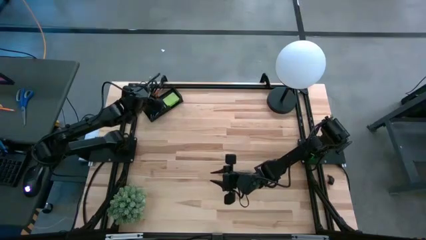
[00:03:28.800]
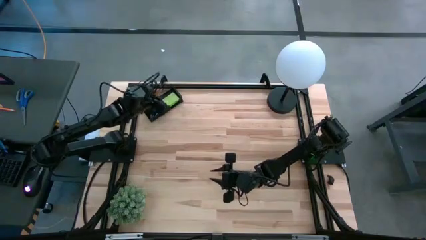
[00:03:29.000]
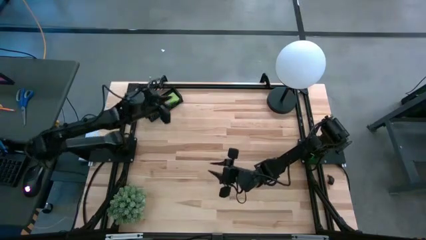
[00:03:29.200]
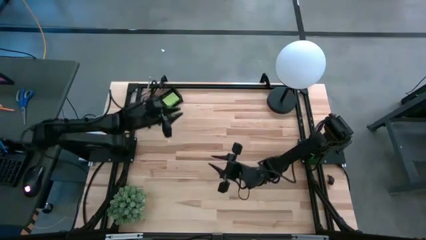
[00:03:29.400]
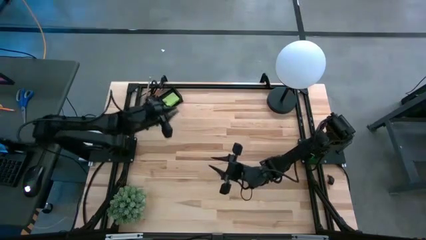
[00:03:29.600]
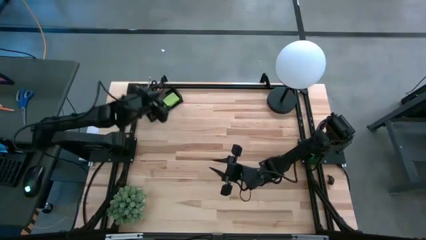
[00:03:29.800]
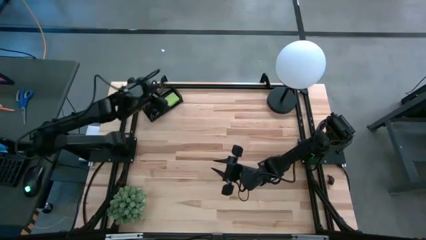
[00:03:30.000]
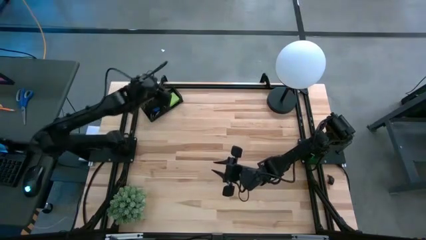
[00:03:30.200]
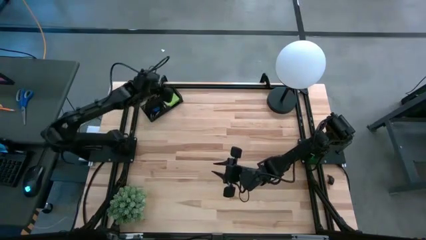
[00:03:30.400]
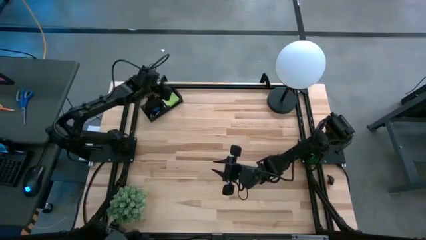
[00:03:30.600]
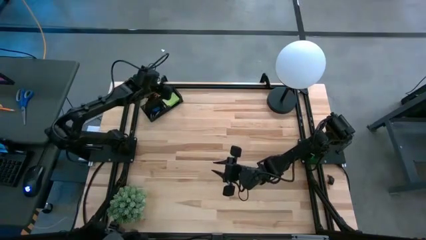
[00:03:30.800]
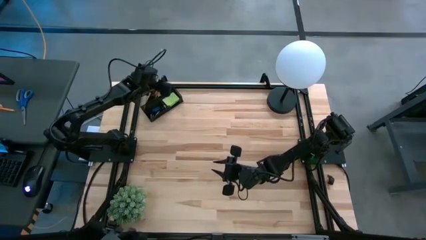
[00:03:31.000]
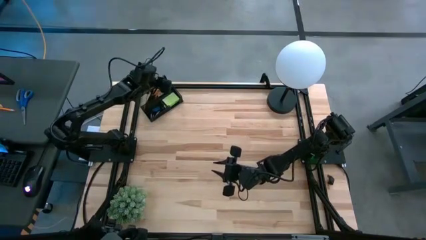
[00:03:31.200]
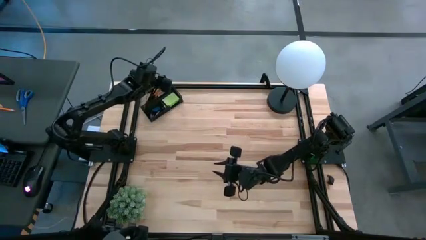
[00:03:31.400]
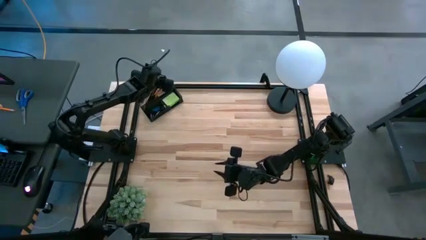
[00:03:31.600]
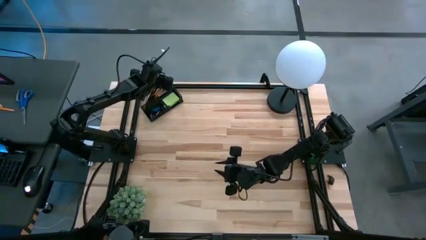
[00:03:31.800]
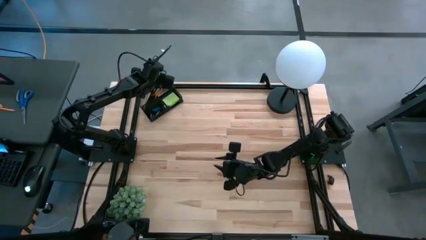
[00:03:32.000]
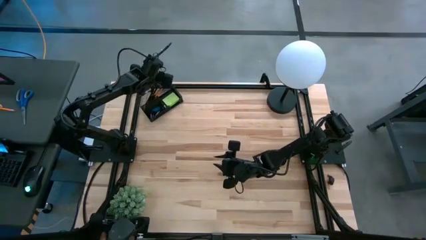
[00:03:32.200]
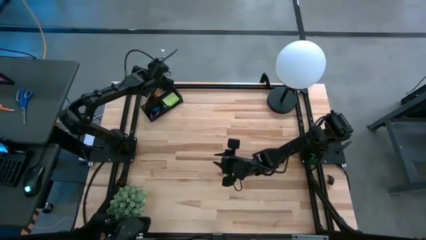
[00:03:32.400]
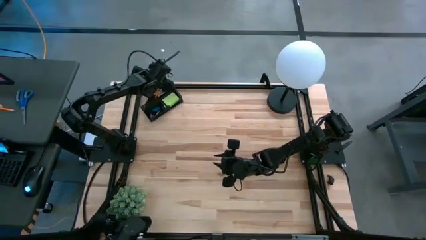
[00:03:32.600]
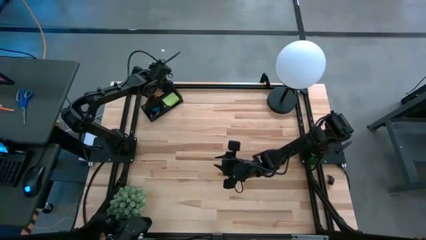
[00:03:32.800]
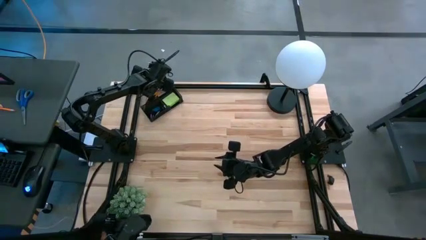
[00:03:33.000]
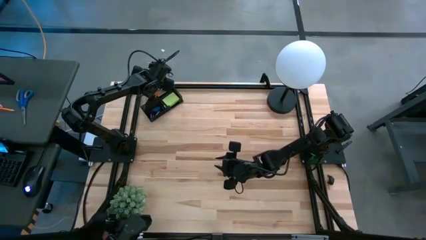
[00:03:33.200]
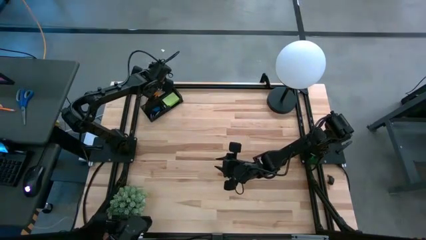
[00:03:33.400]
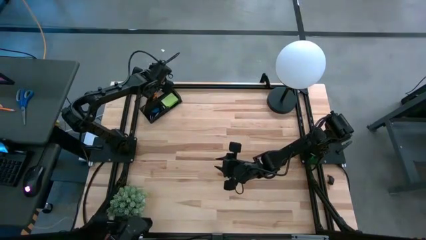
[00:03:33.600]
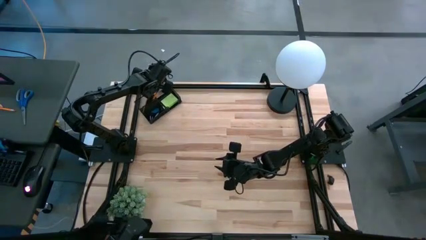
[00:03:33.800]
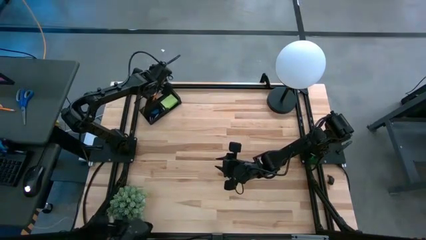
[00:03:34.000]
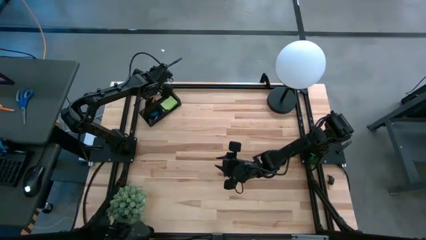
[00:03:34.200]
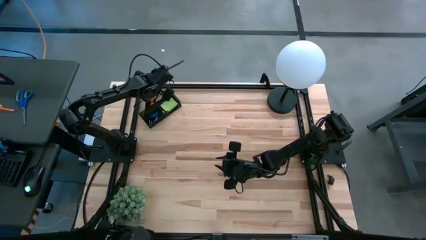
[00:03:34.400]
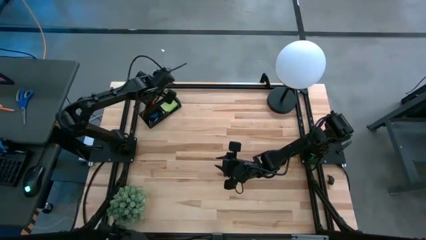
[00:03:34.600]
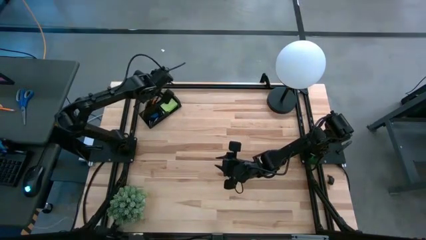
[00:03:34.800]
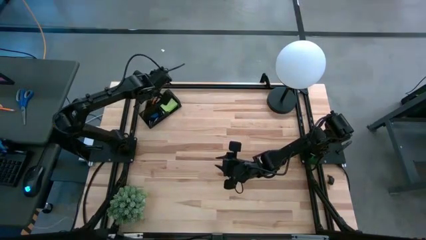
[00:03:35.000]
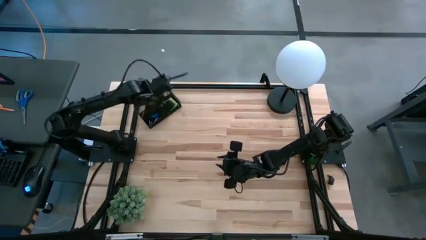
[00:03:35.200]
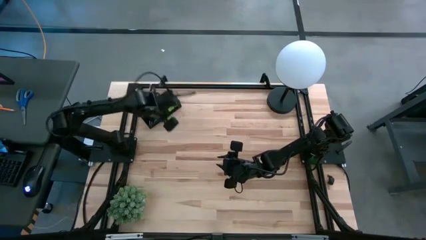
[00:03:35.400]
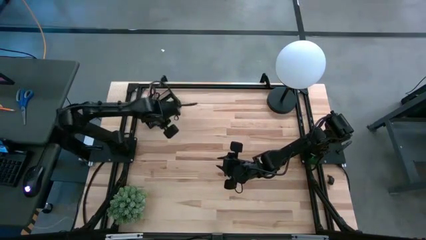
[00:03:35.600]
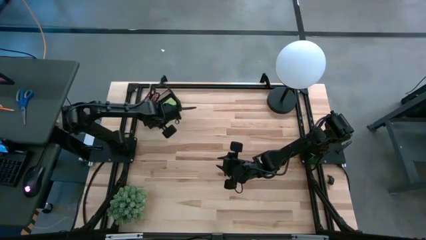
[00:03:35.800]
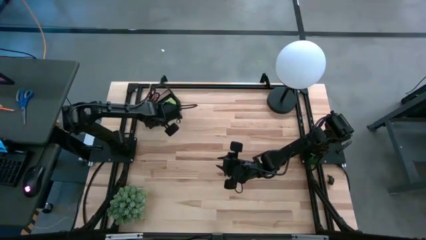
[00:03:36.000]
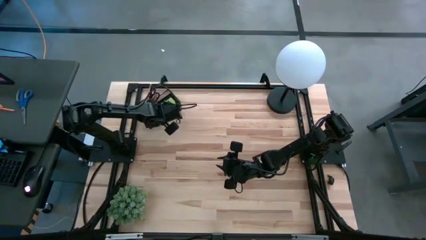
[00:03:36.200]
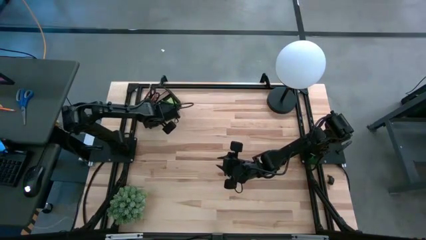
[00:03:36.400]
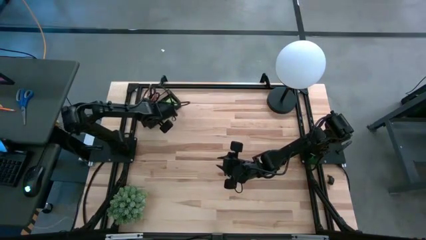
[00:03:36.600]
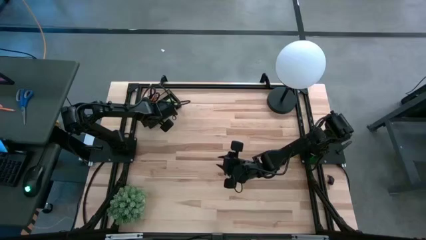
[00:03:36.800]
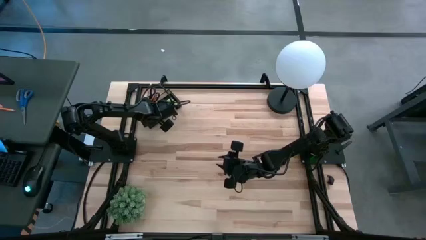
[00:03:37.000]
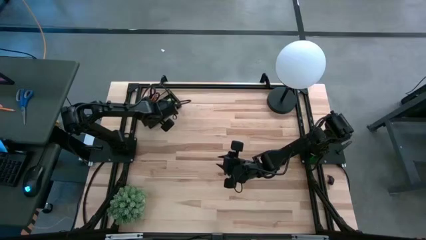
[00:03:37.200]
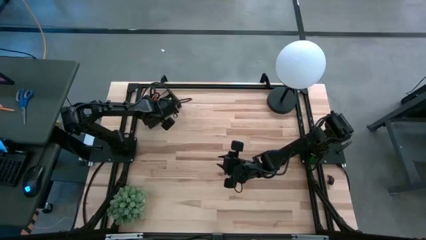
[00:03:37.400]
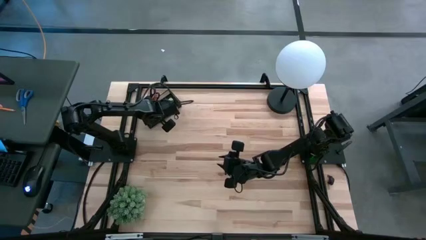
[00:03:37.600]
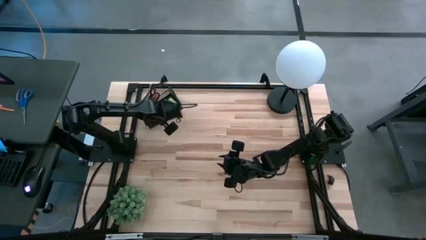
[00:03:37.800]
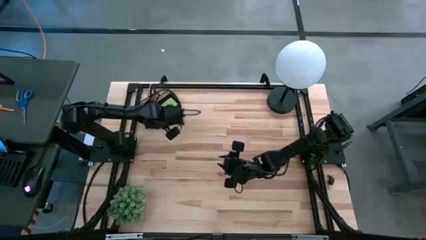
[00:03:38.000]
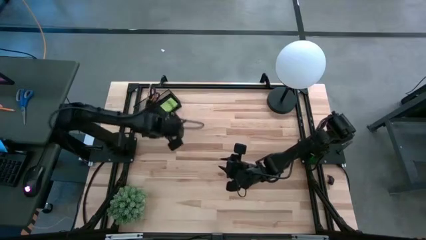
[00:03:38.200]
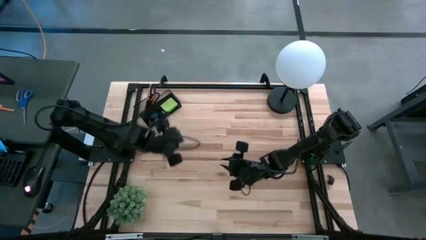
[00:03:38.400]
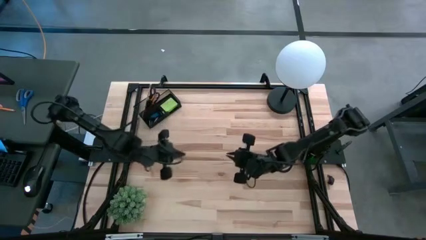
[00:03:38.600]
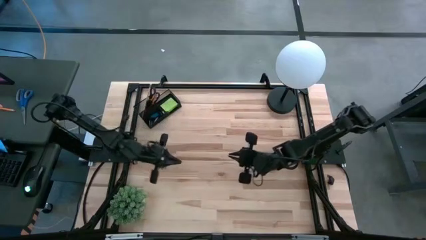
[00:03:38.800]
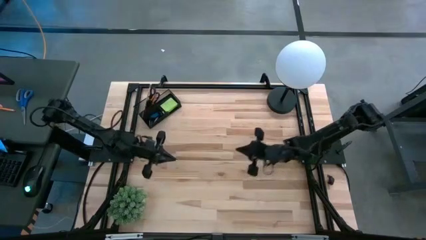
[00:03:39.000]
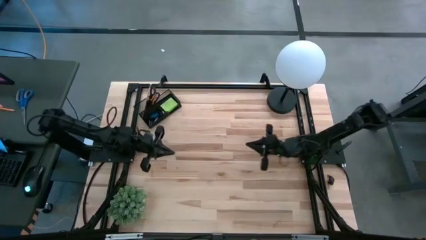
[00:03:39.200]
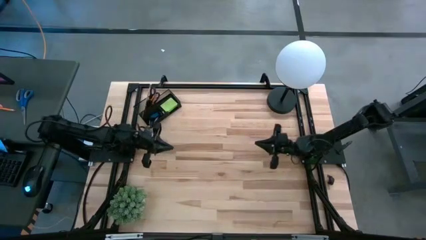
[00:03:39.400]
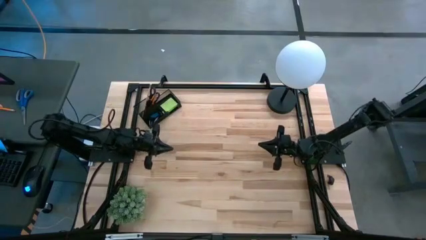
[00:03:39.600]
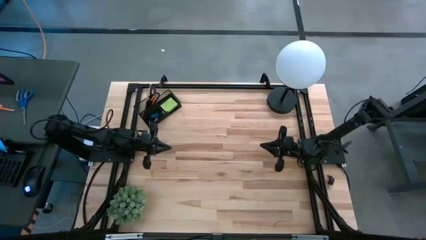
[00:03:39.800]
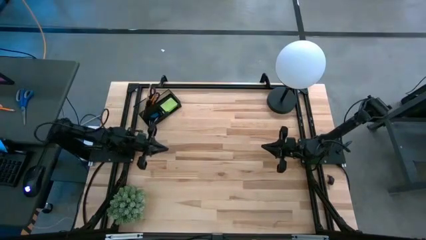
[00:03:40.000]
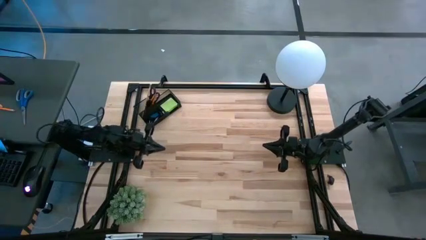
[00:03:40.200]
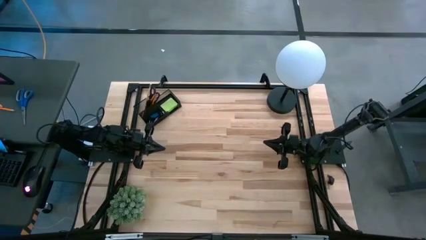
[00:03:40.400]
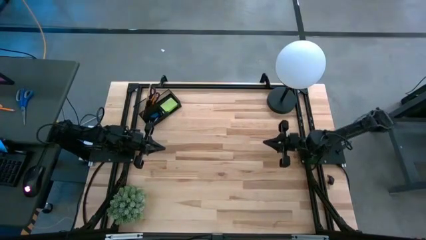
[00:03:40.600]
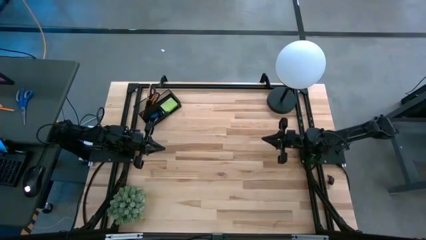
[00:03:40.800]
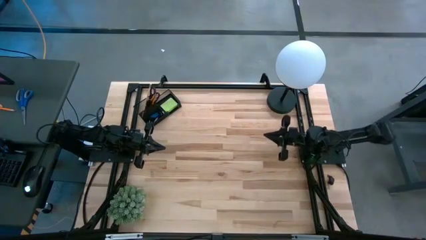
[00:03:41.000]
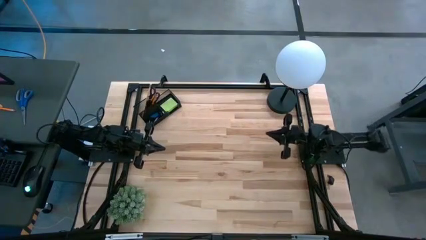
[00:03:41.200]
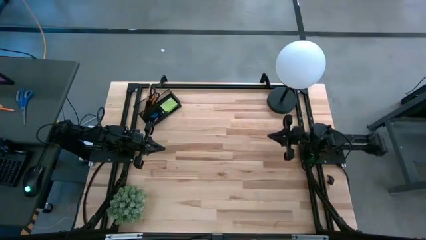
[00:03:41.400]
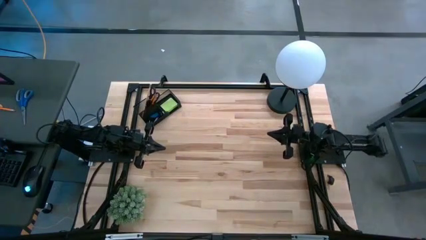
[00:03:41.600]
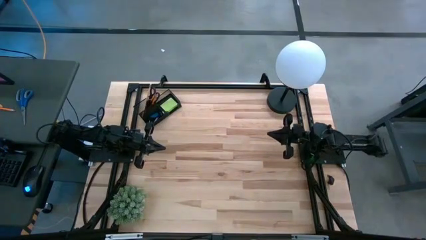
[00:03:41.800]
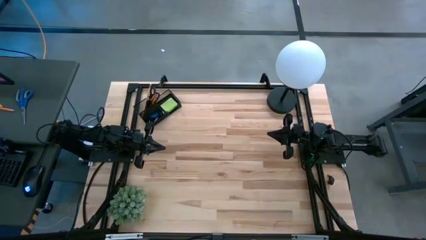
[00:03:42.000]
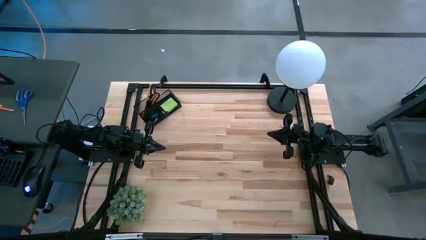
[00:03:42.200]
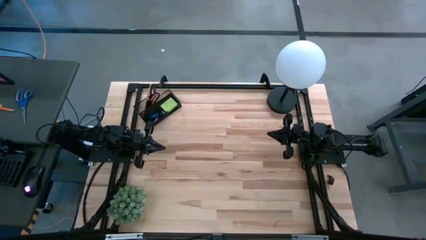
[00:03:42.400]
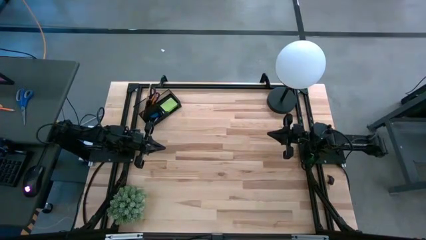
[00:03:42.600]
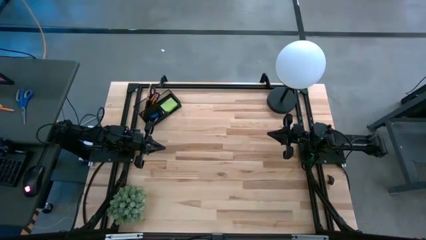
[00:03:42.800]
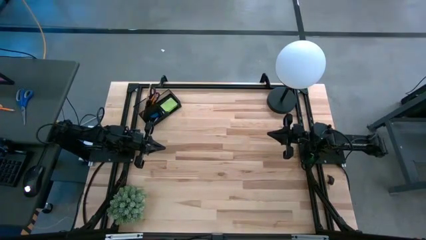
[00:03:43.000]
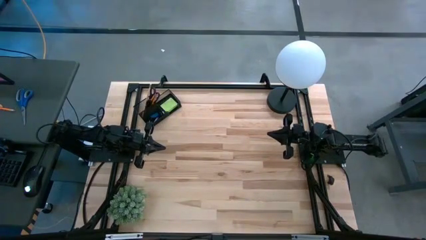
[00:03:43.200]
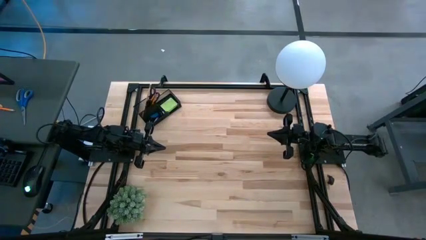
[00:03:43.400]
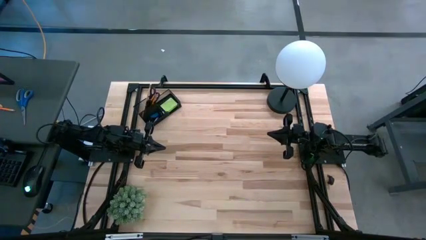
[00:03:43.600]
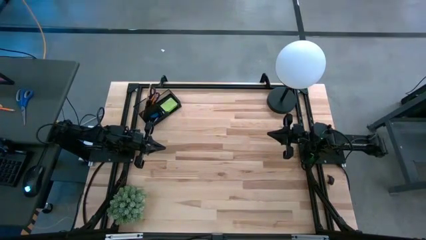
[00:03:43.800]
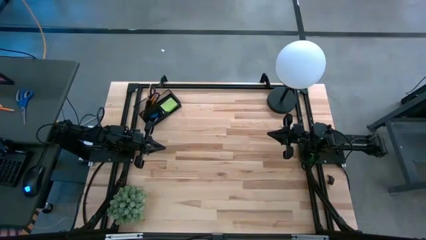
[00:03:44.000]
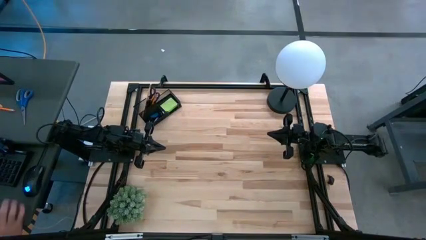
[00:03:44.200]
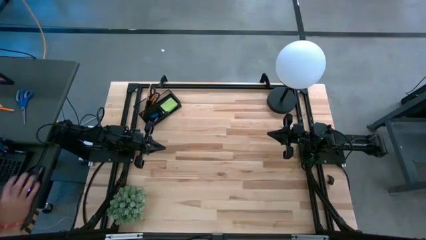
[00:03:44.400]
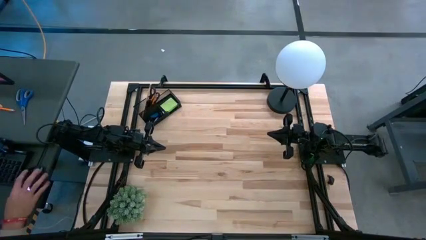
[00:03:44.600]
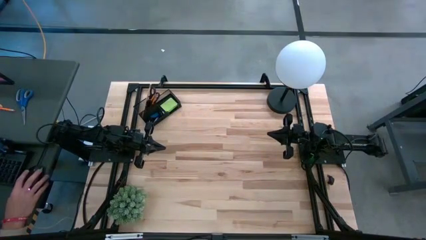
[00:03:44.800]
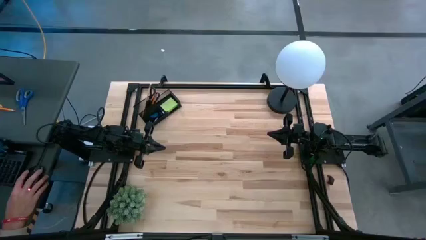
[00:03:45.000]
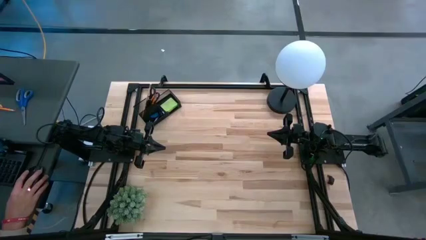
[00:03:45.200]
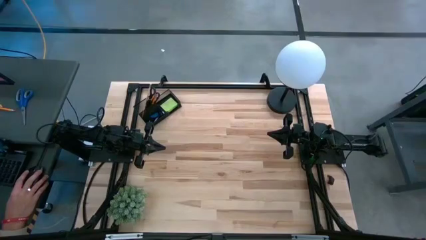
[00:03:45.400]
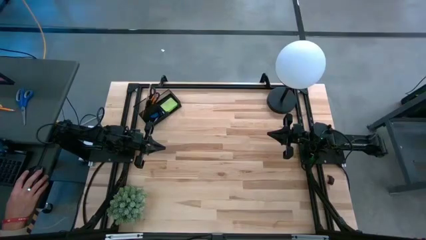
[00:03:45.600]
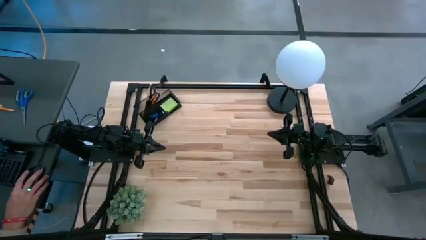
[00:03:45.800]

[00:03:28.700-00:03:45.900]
Task: Pick and place office supplies into organizer
Return to Home Position
